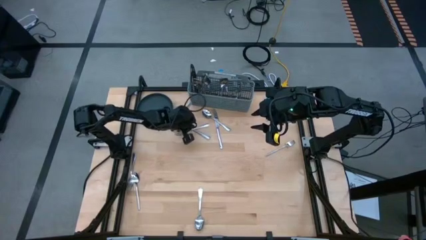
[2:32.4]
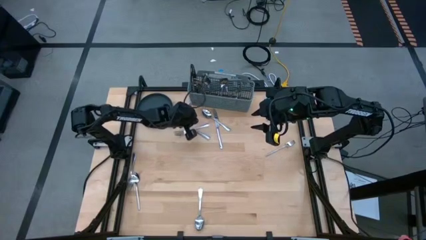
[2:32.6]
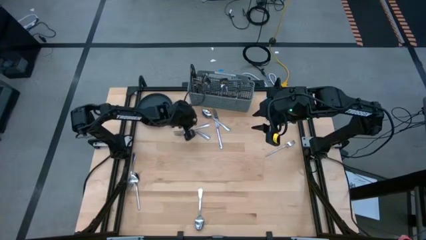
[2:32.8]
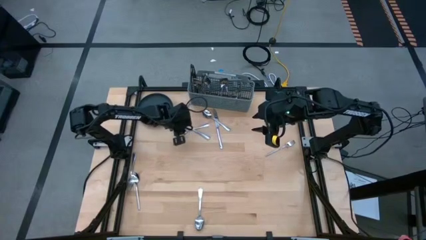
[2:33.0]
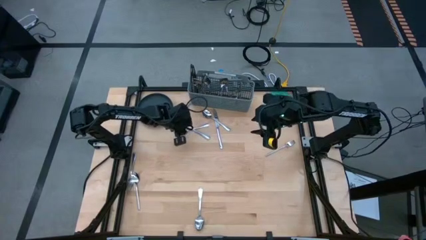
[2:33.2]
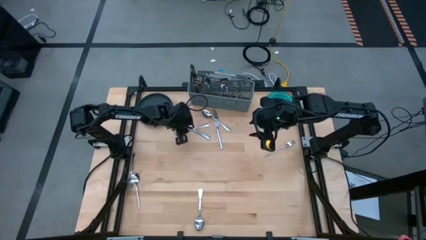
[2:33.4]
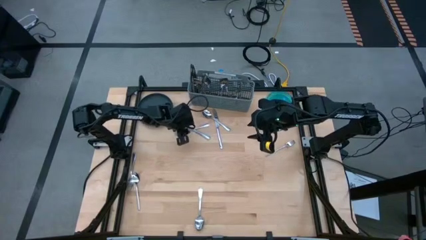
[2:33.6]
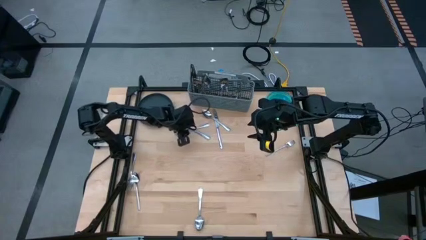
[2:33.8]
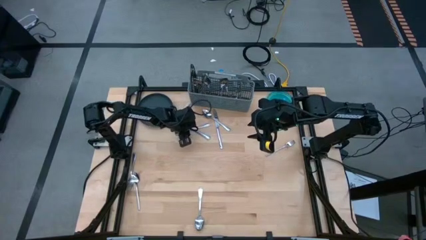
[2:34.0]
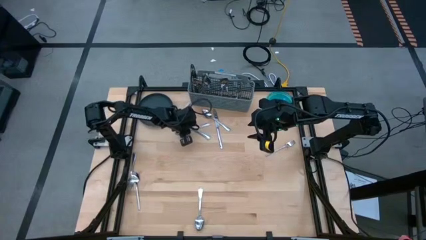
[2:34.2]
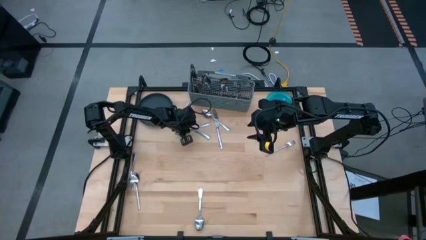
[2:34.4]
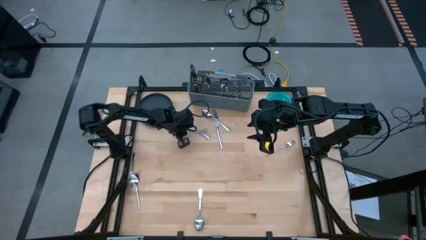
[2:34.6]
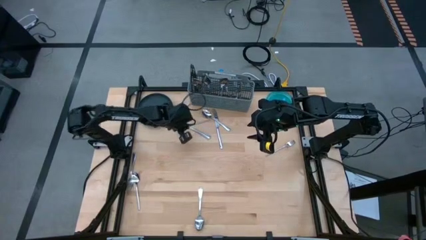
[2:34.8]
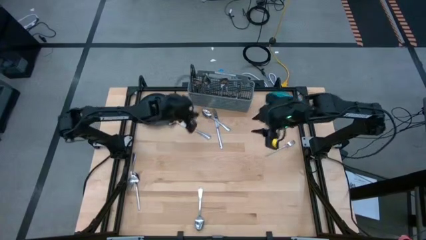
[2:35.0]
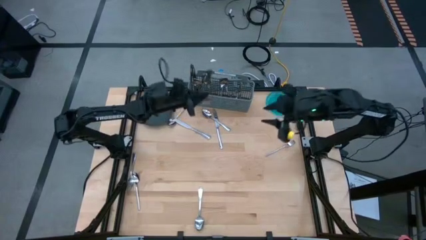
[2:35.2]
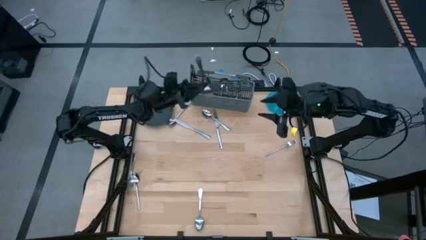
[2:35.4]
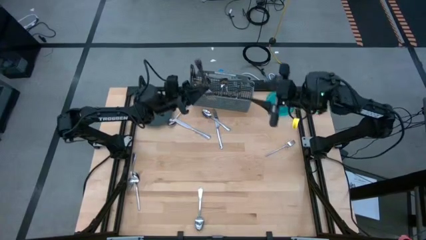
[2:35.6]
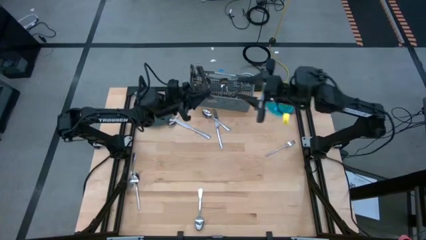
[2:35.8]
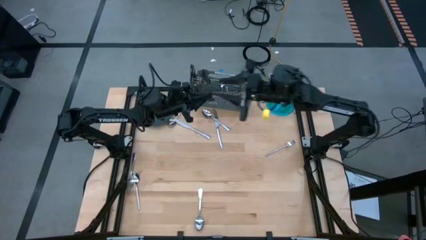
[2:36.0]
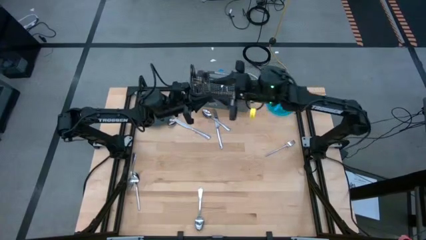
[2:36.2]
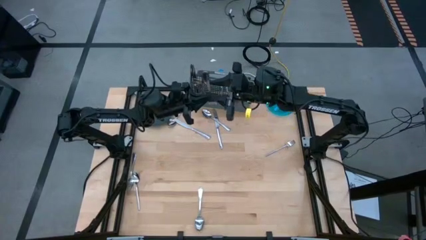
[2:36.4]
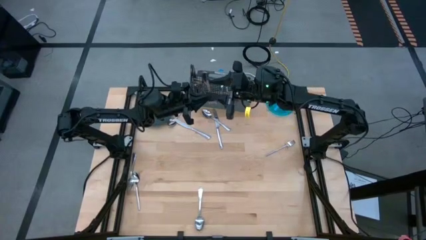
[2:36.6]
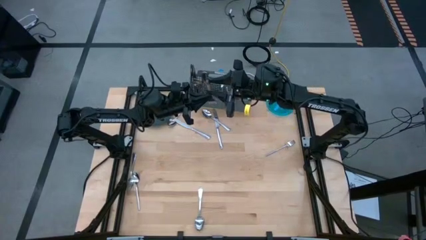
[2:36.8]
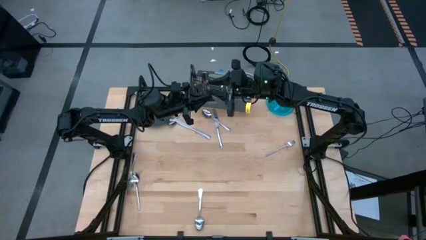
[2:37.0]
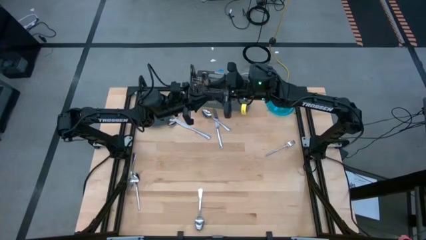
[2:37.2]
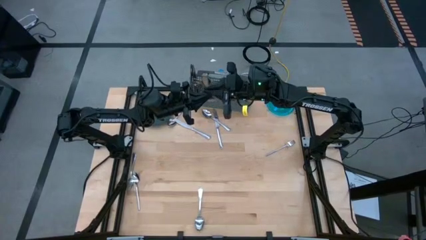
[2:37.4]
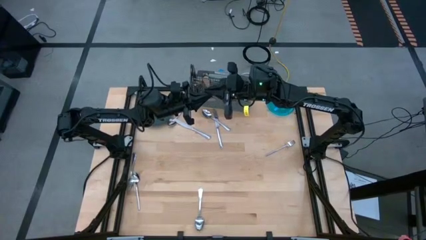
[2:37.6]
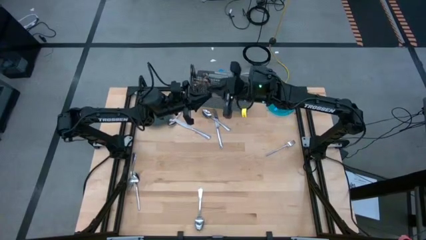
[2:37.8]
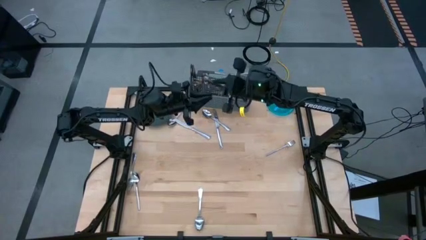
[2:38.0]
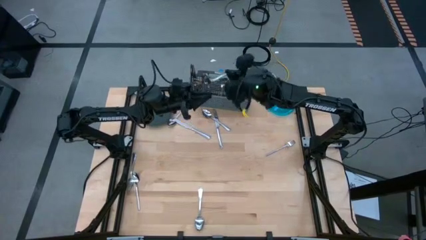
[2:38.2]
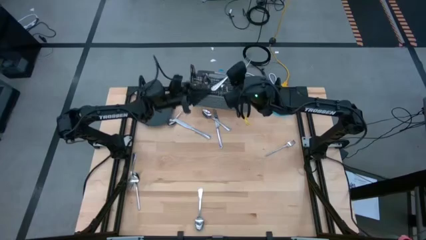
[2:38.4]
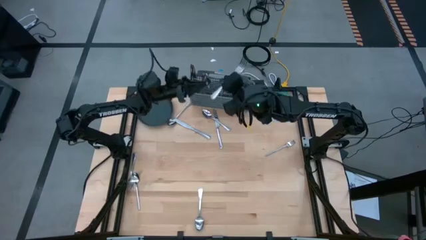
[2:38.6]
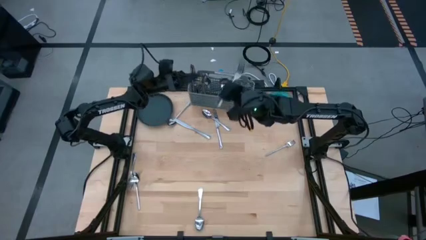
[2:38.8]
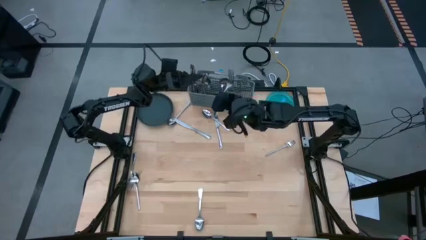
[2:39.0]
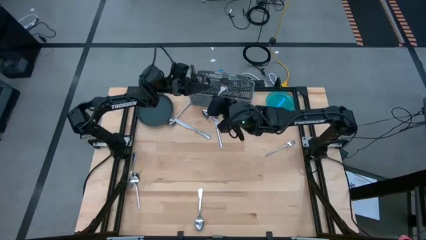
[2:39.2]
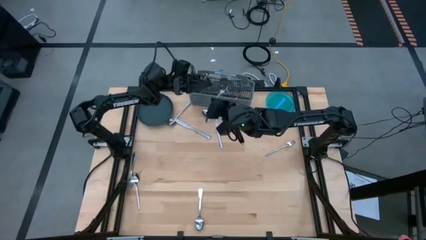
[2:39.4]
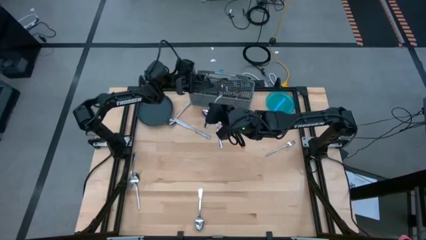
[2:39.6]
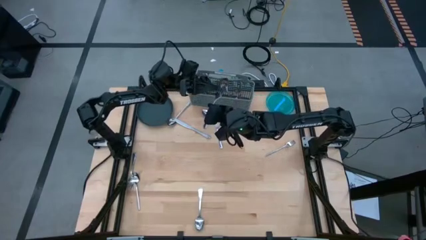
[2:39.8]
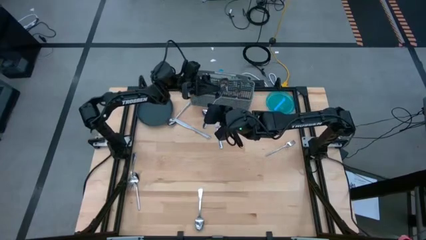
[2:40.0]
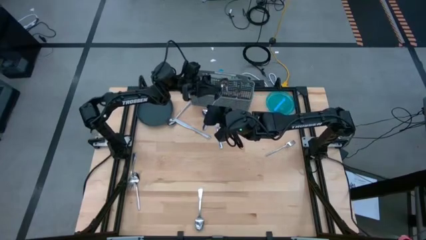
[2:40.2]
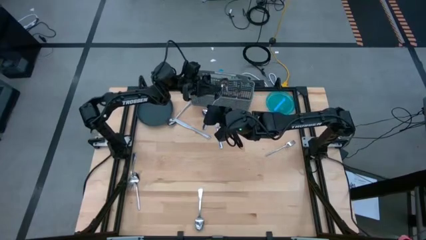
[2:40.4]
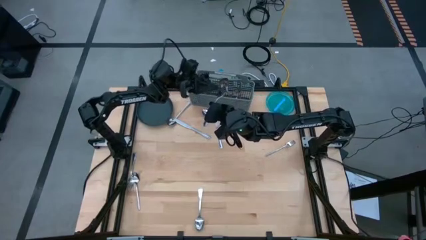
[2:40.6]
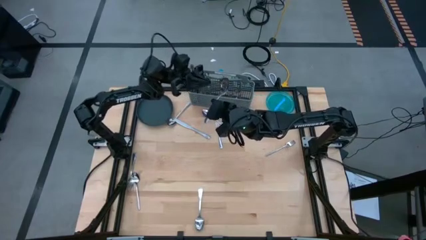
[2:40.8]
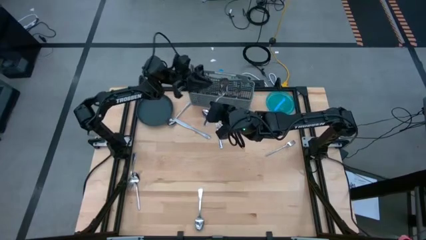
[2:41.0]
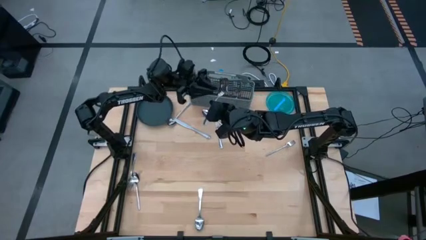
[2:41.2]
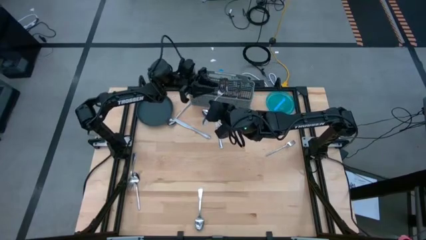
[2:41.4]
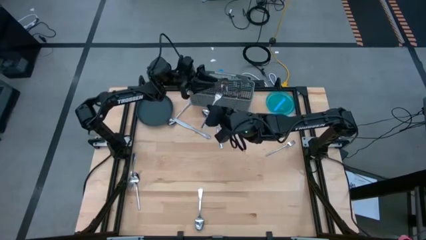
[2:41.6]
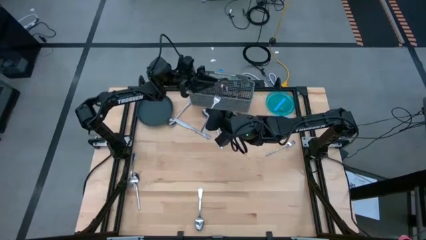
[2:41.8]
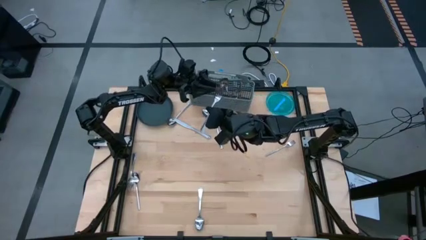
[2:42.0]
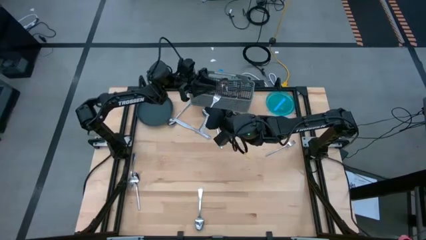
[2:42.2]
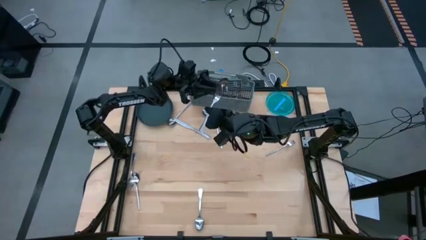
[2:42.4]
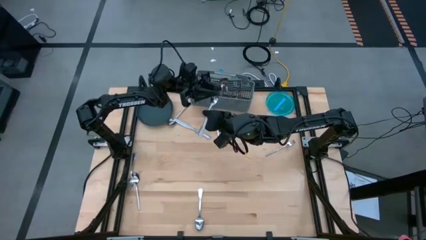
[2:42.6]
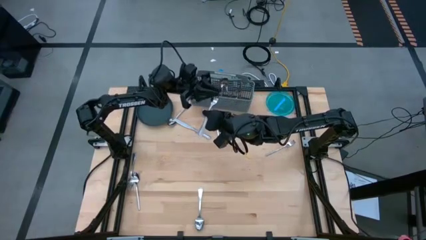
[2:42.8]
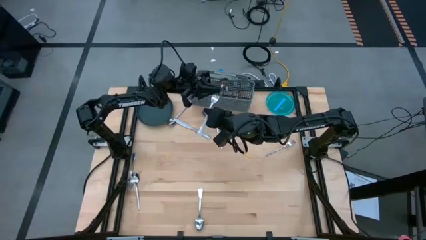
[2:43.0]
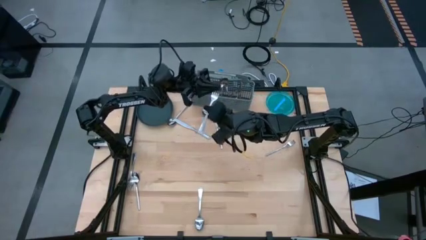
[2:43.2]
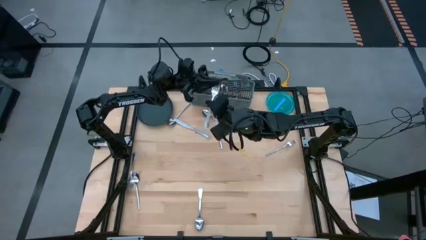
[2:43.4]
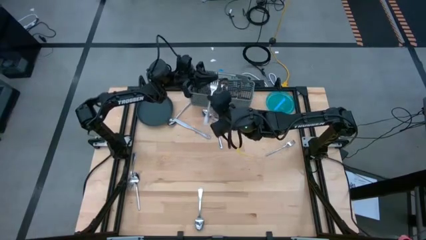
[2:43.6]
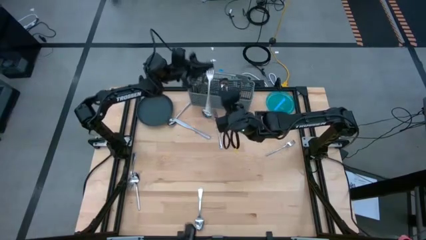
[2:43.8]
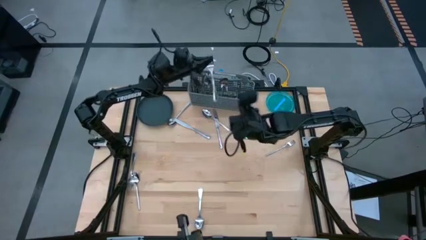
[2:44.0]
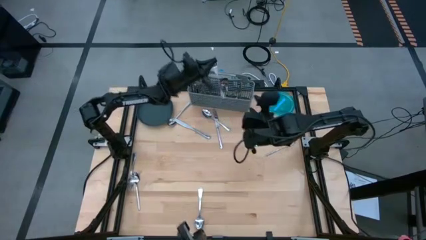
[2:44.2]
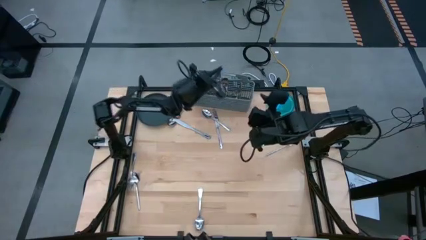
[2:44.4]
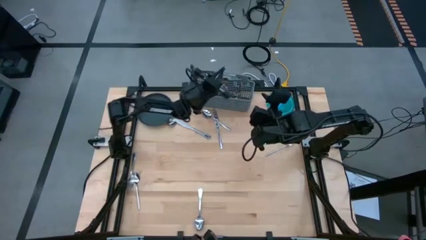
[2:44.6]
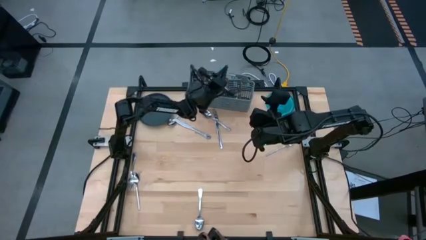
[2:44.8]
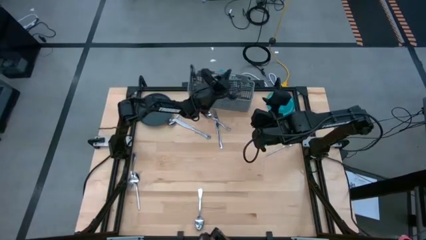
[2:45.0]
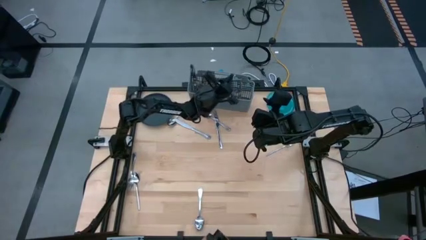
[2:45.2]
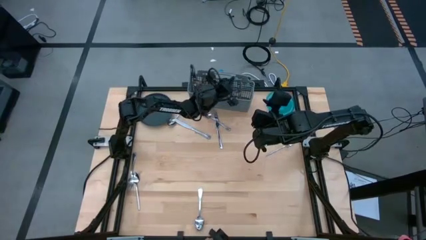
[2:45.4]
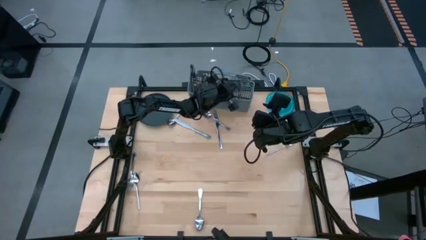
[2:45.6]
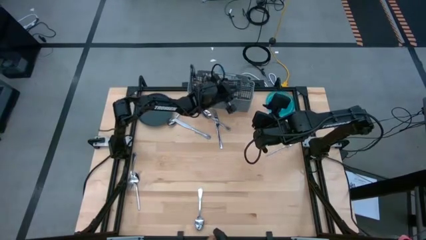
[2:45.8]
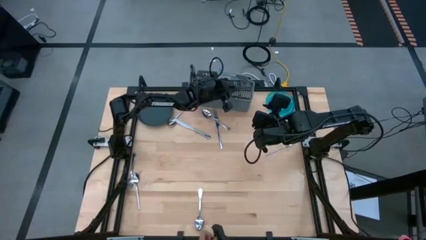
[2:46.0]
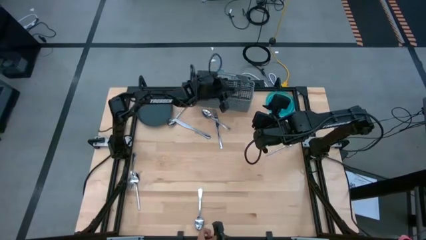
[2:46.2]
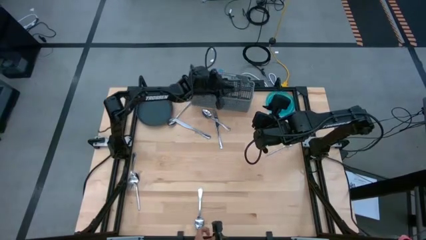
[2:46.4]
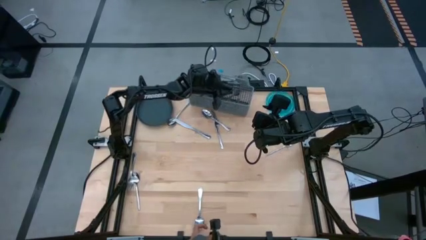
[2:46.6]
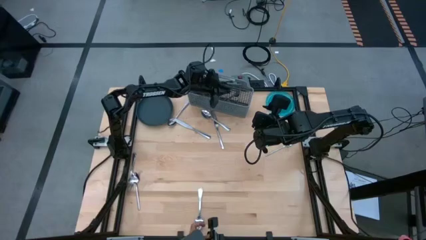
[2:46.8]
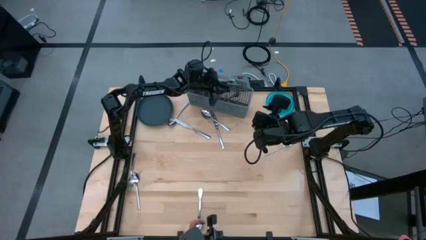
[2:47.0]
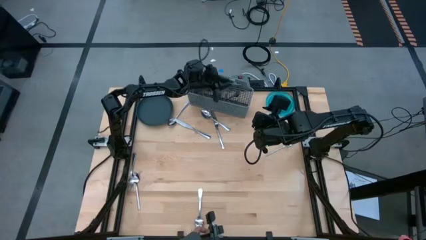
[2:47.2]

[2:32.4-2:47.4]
Task: Sort silverware
Put the fork into the silverware basket
